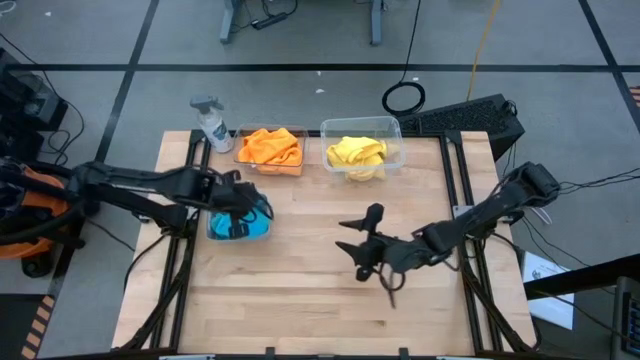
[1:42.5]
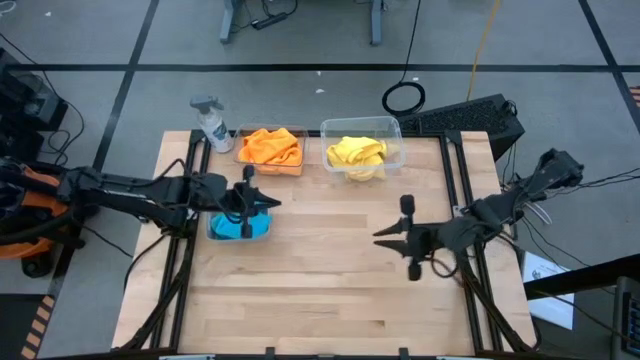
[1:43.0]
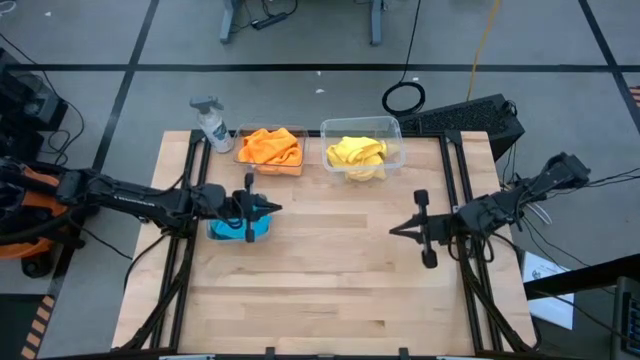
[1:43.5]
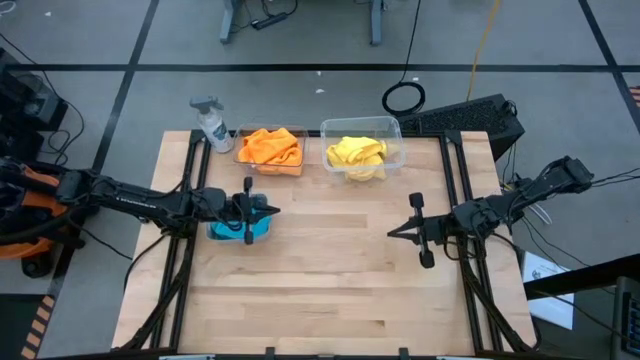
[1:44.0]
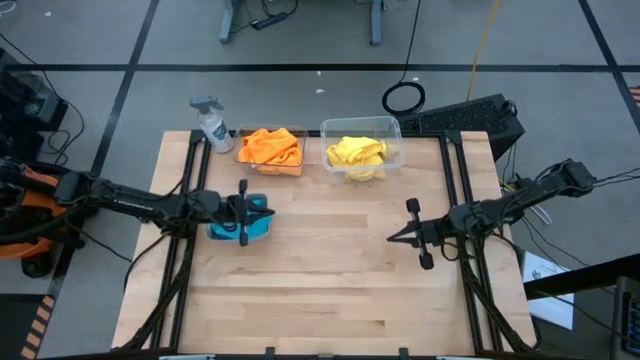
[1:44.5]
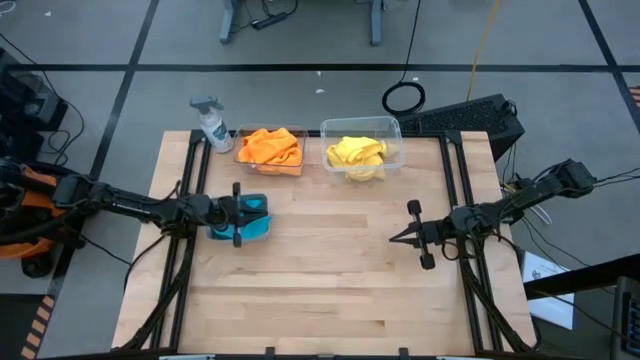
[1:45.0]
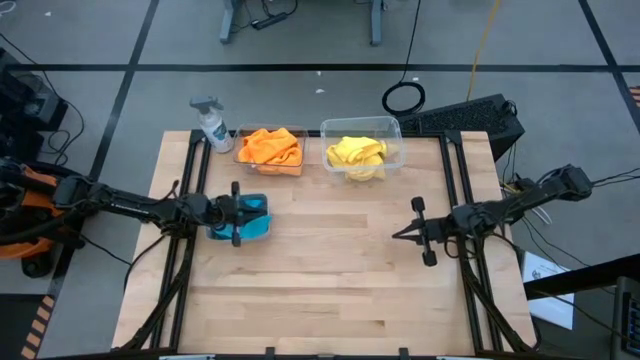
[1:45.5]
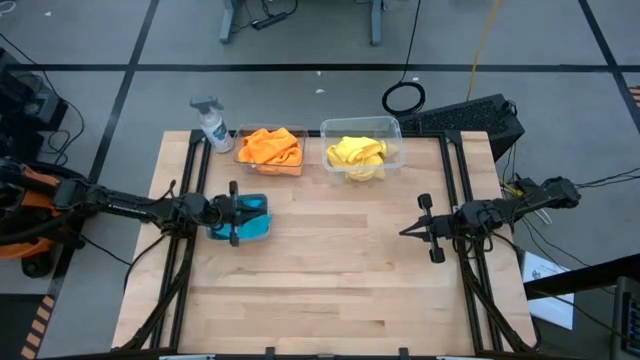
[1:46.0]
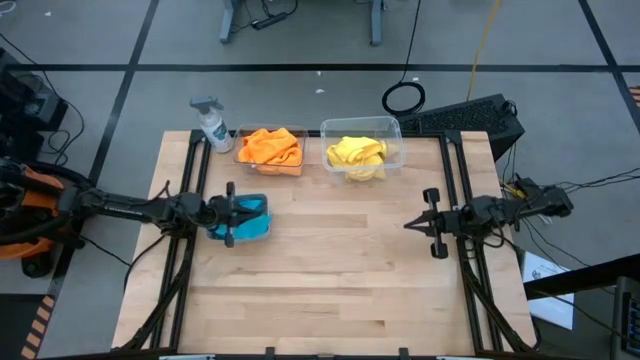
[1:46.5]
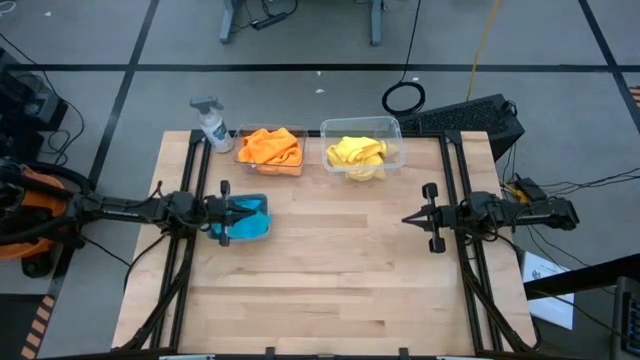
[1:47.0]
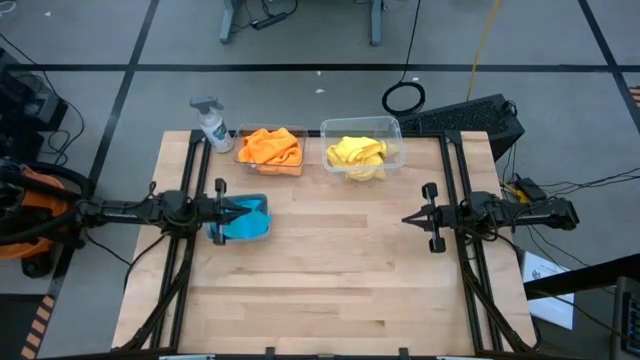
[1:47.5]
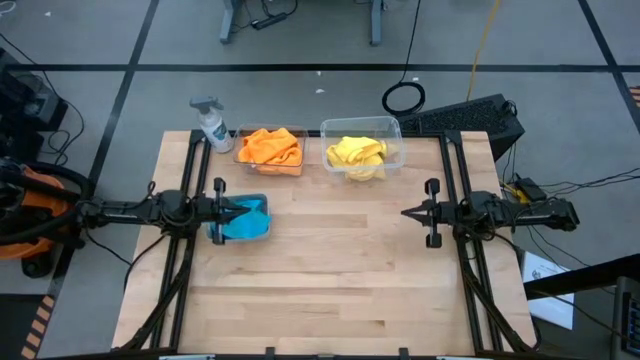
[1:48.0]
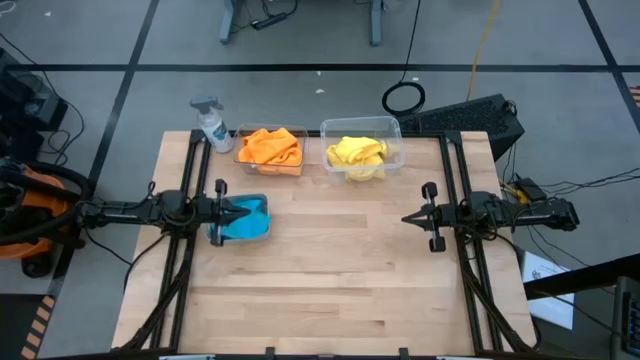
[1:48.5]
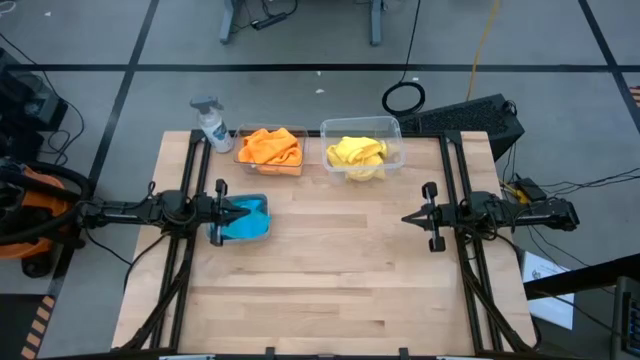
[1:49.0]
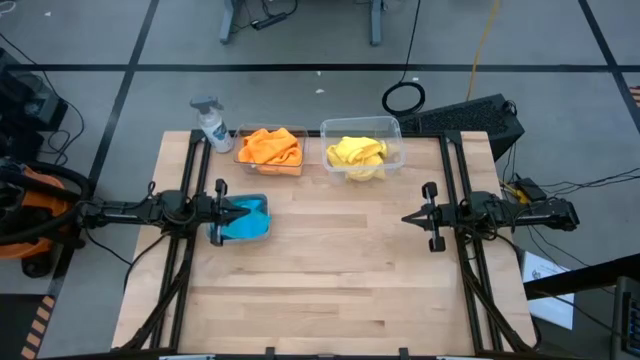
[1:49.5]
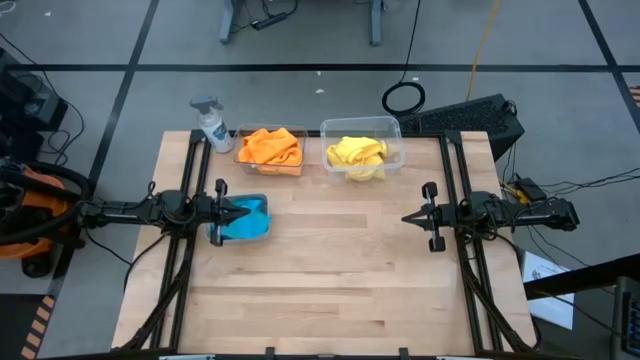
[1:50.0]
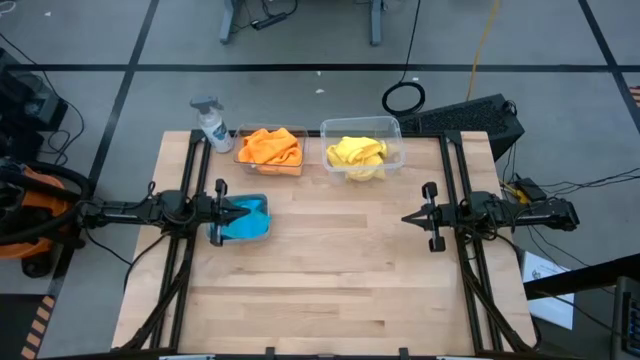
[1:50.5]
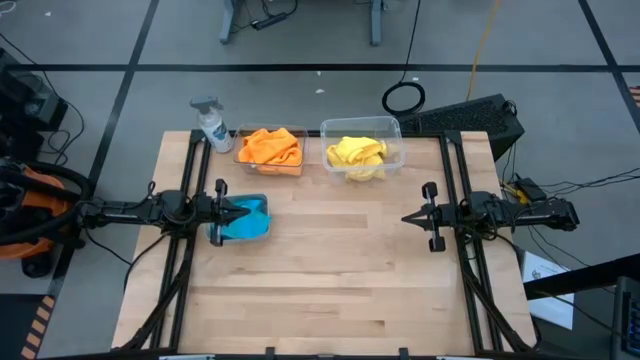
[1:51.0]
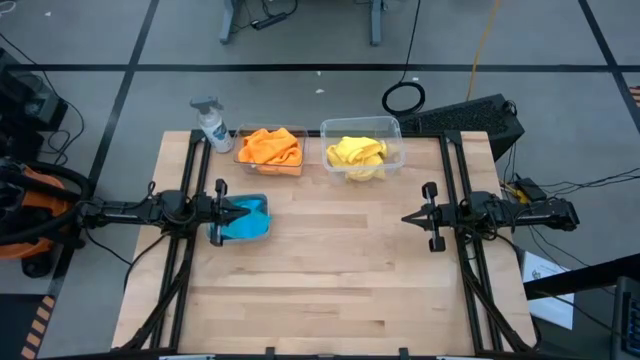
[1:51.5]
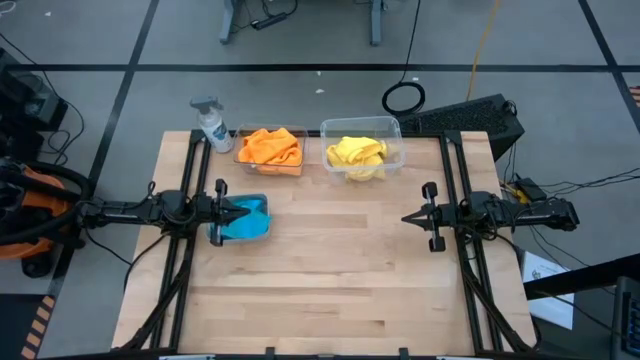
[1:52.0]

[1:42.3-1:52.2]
Task: Sort microfiber towel by color & place in baskets
Return to Home Position

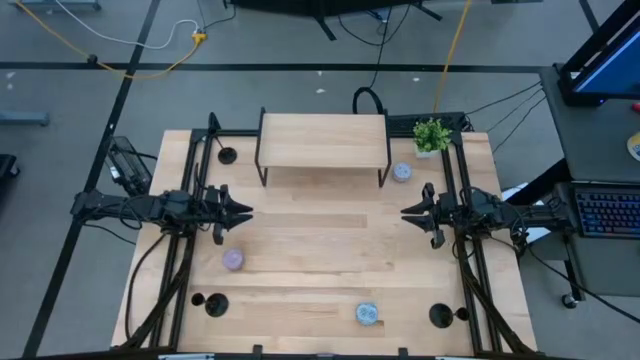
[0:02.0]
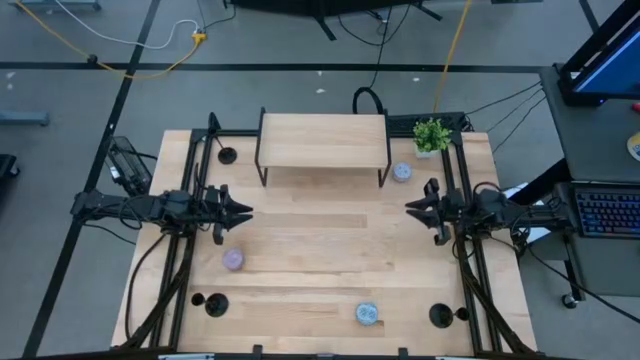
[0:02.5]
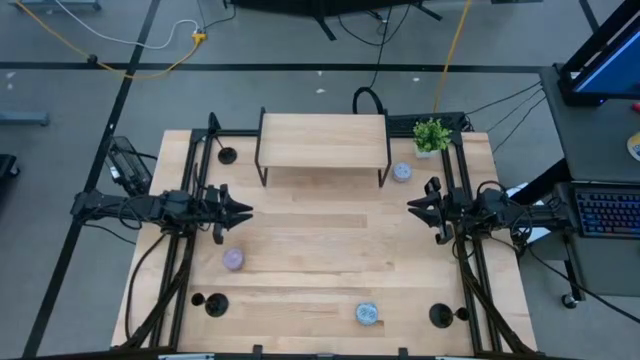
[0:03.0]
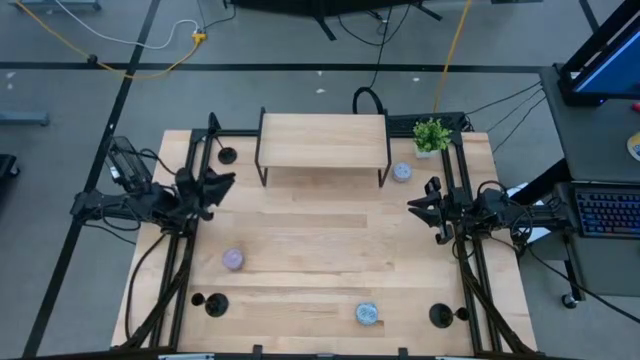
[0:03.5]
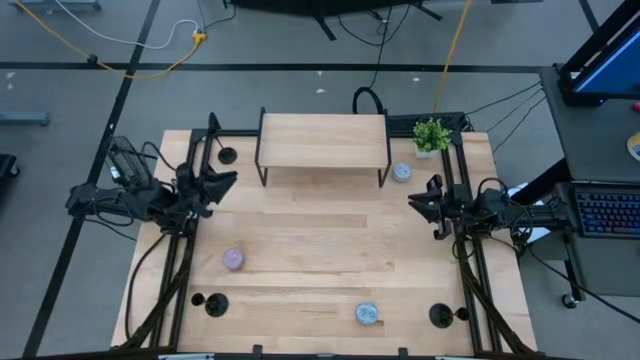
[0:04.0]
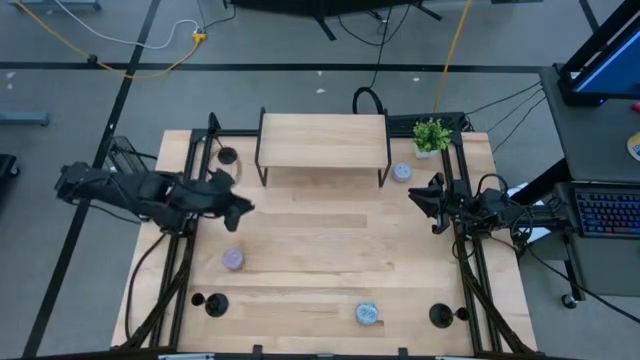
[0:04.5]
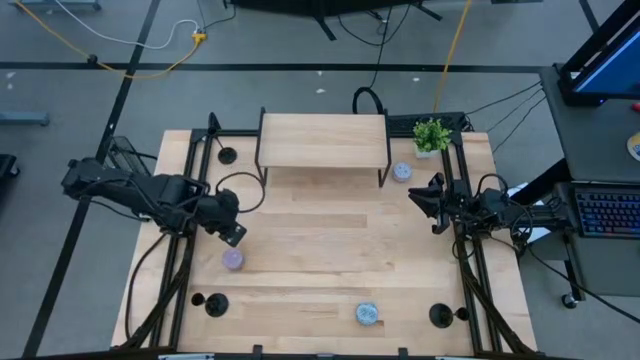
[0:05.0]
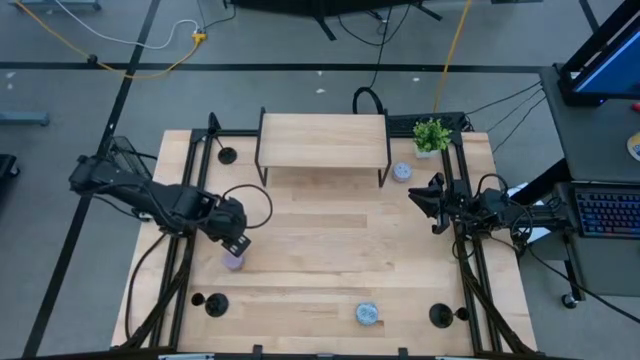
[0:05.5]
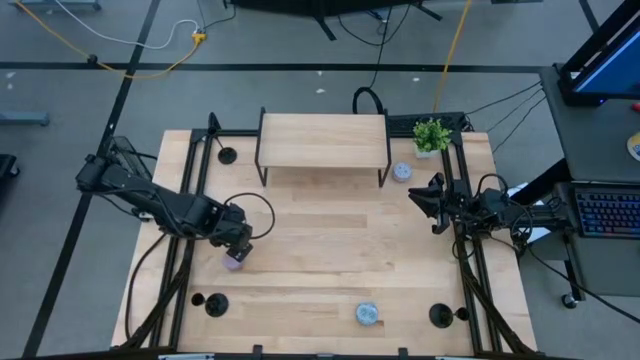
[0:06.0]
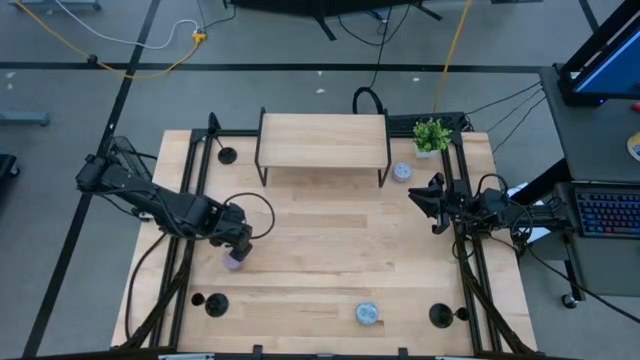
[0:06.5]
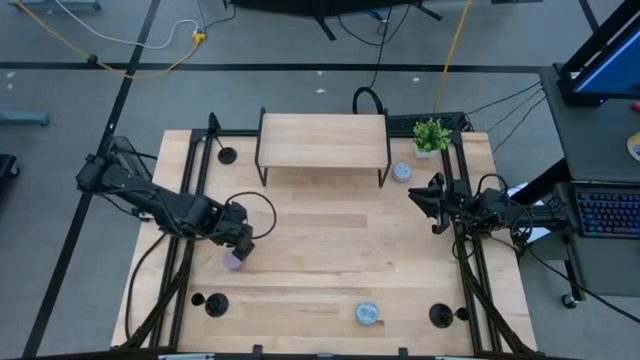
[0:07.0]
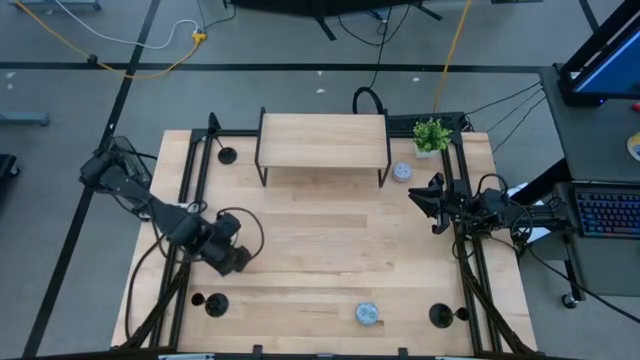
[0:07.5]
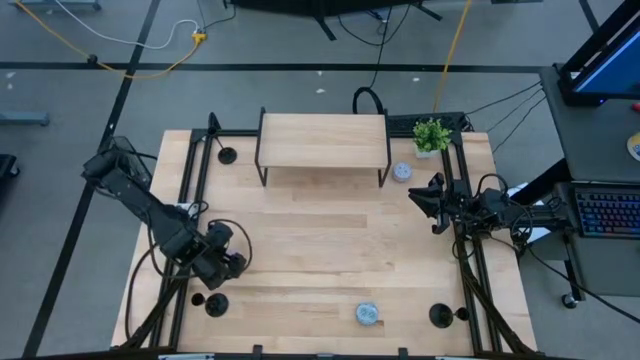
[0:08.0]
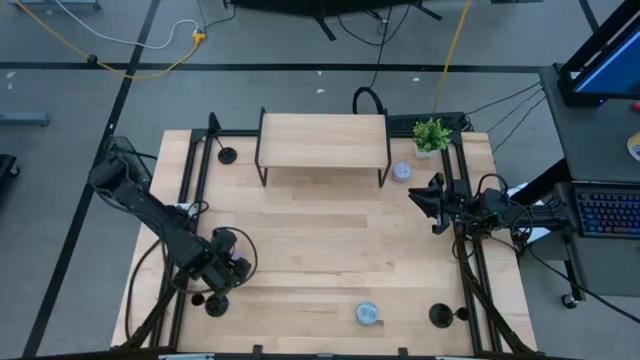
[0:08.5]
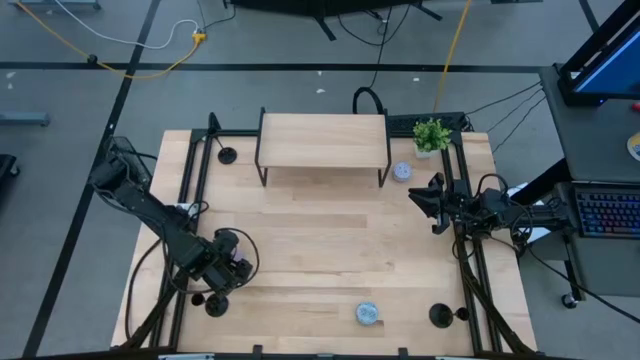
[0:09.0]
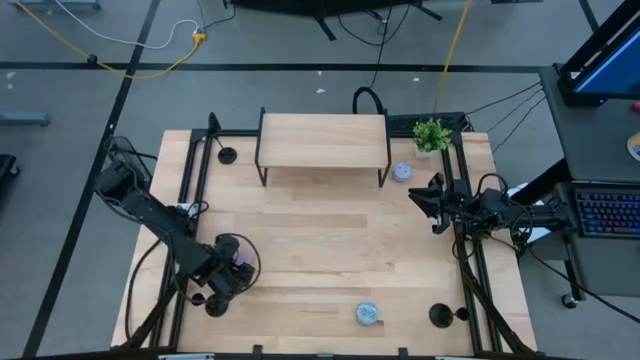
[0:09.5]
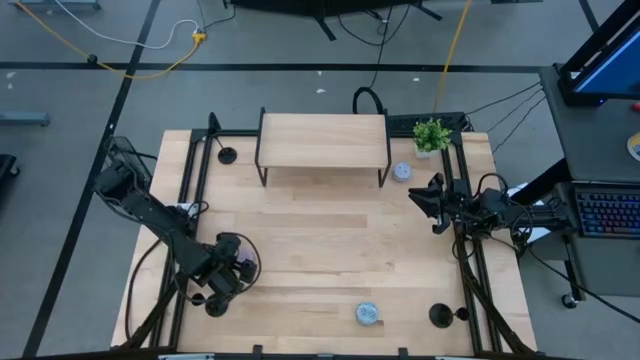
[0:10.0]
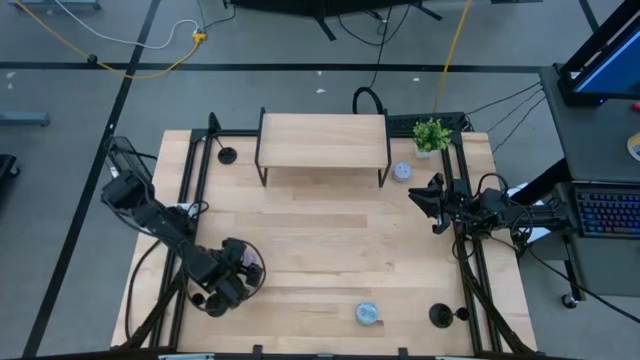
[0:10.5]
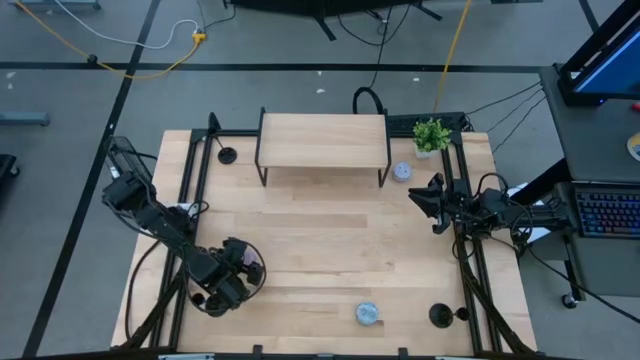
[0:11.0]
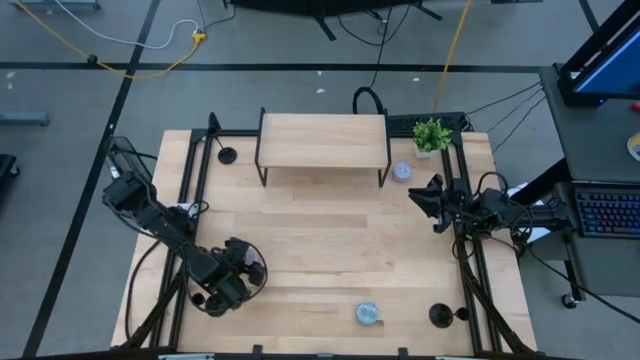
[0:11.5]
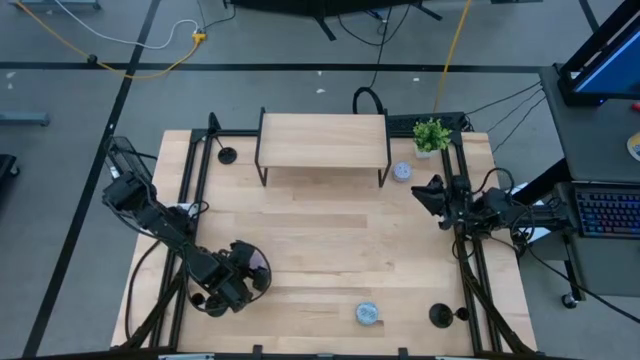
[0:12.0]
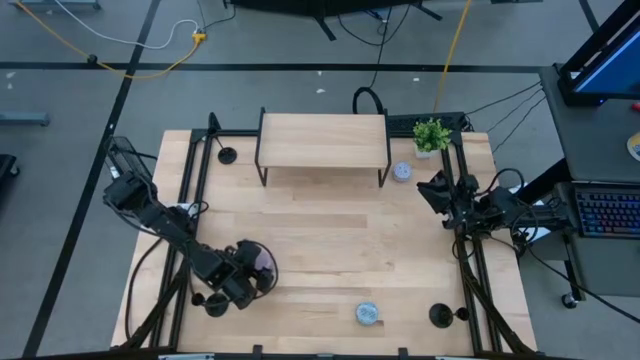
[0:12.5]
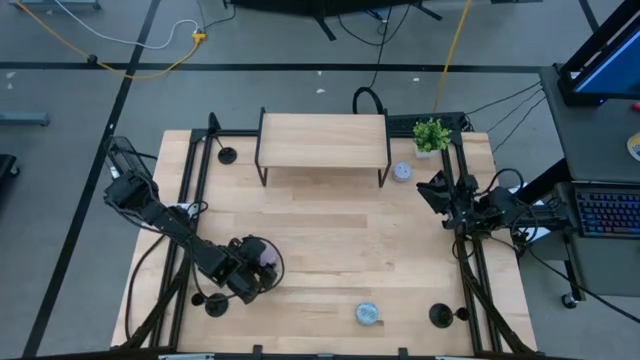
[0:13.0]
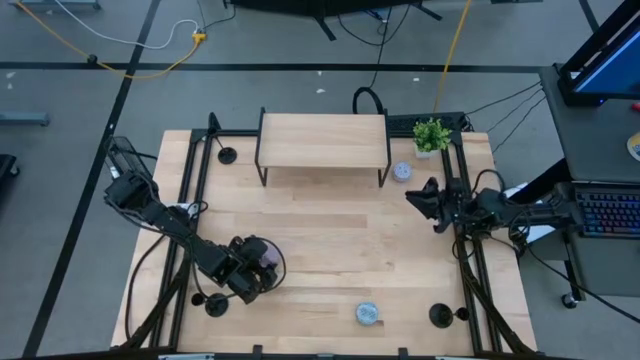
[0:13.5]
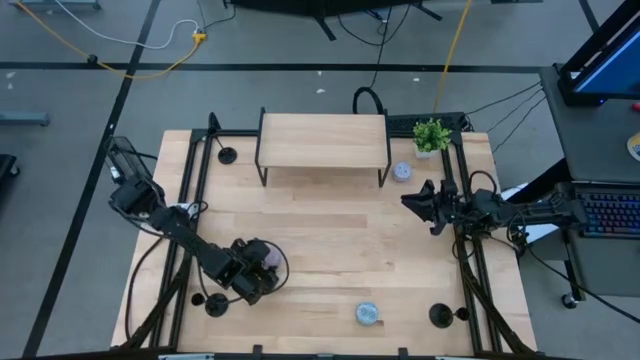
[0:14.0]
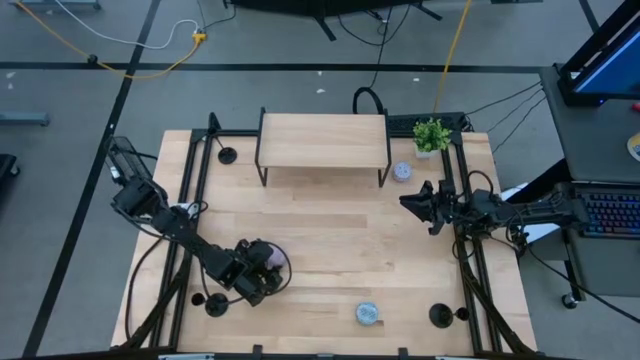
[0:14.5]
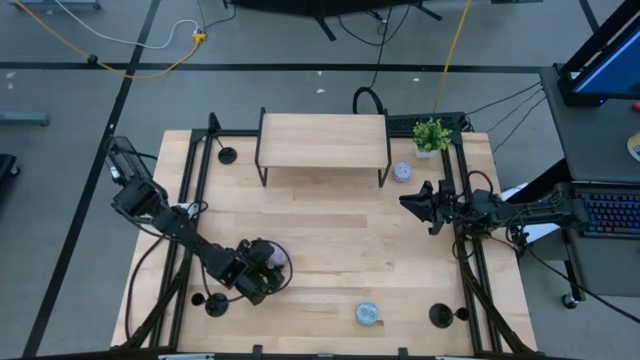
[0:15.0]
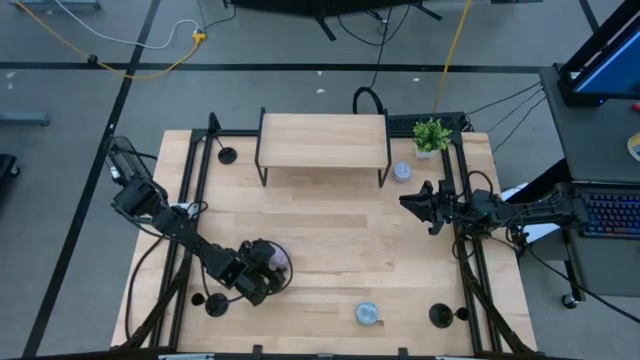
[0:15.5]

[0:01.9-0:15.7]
Task: Pick & Place candle stick holders
Put the pink patterned scented candle on the shelf
